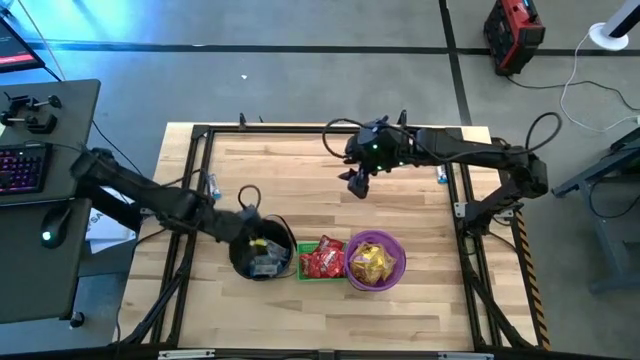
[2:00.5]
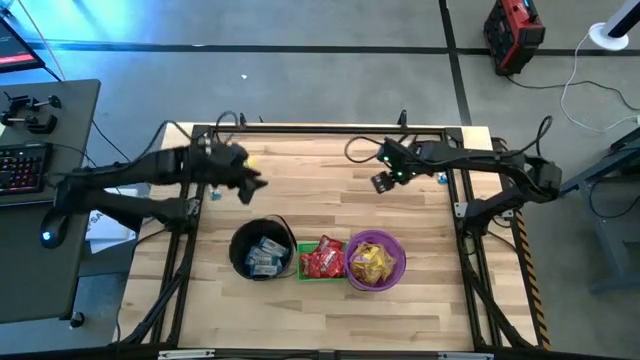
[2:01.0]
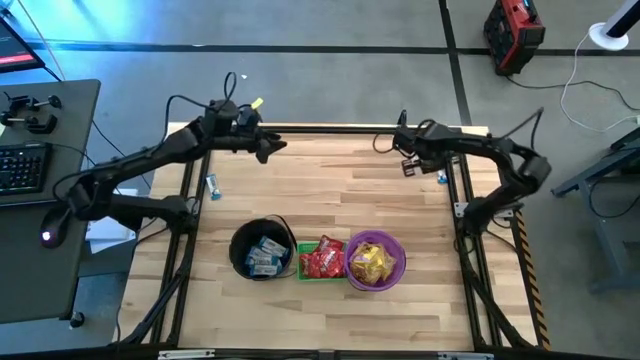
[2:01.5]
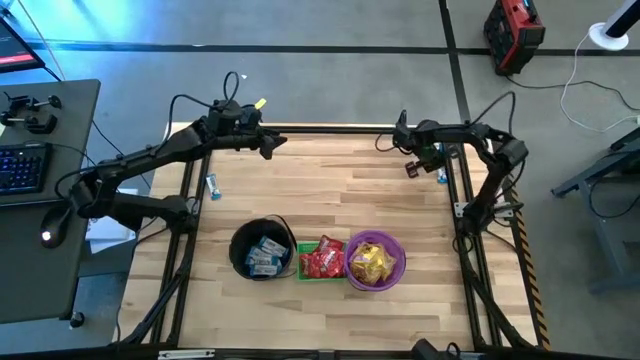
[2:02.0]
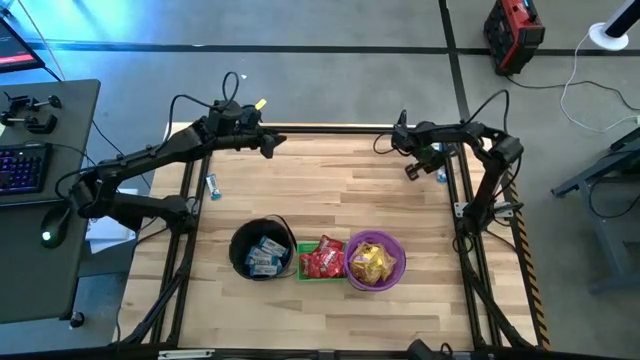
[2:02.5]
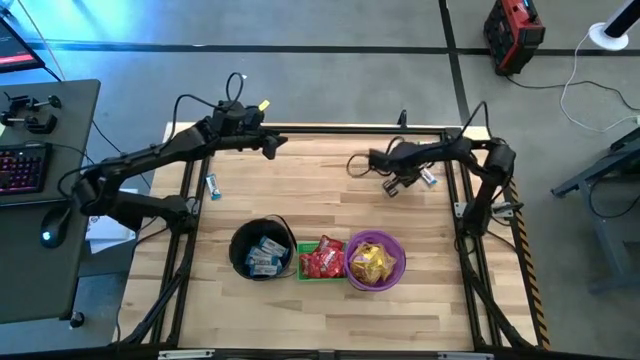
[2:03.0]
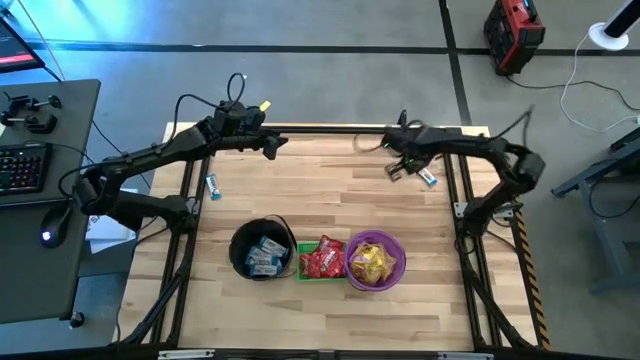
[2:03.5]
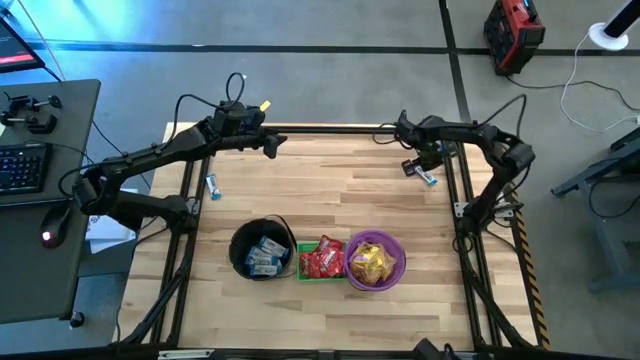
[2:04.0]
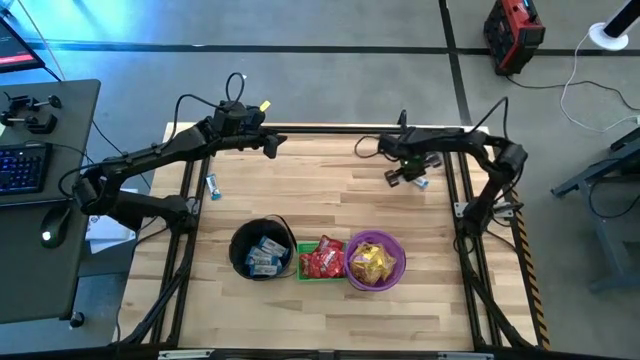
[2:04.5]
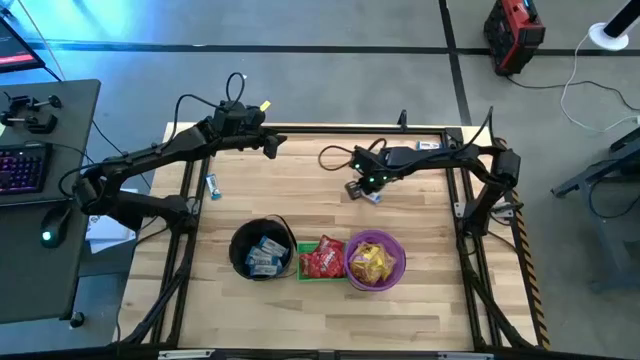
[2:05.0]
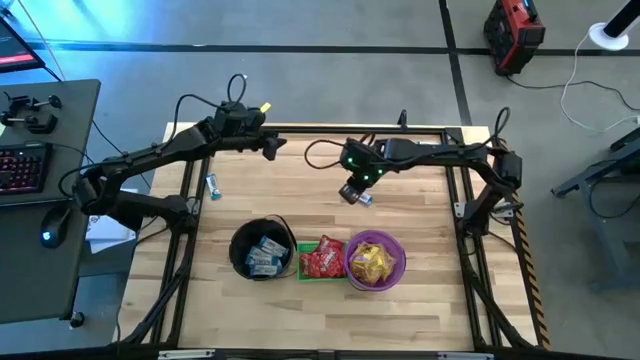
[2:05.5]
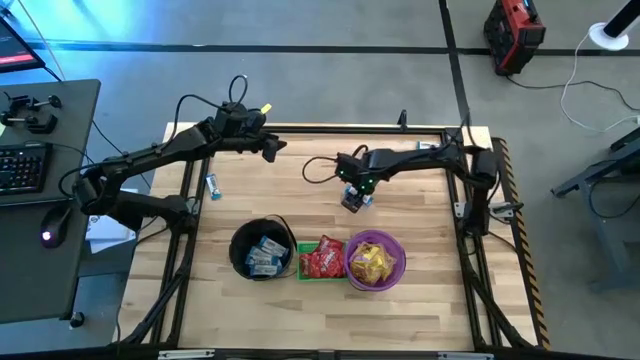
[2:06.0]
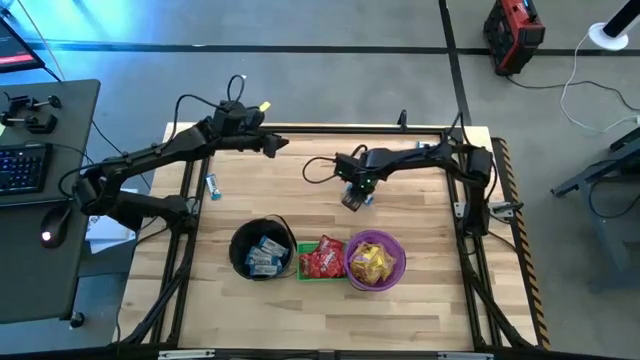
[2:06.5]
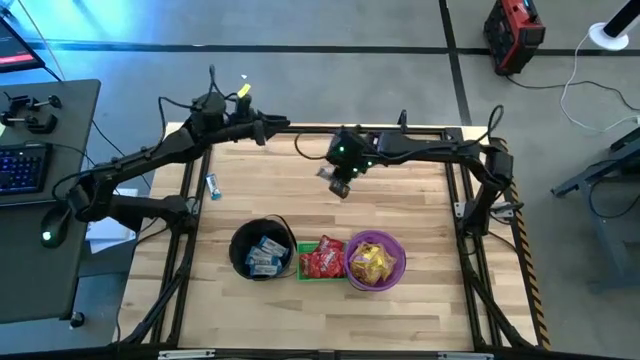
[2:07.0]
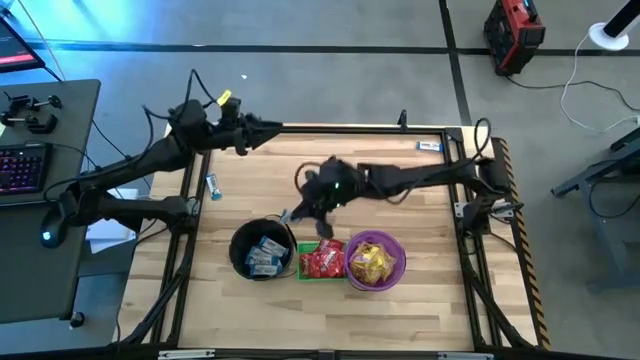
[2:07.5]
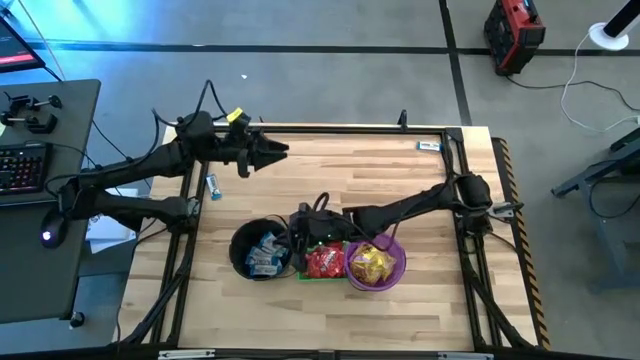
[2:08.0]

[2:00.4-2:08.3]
Task: Sort candy by brand, put in halloween buckets
Put the white chocolate into the black bucket

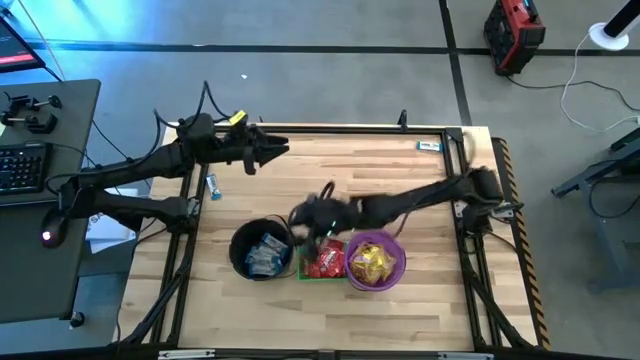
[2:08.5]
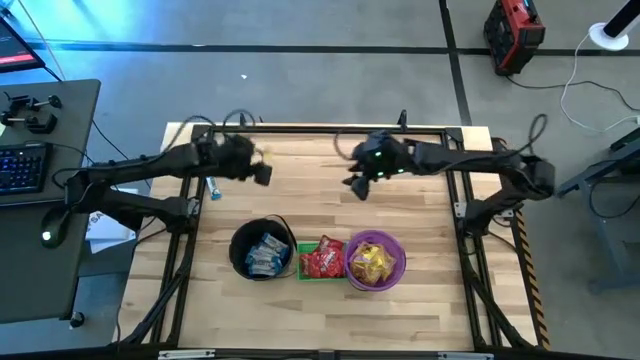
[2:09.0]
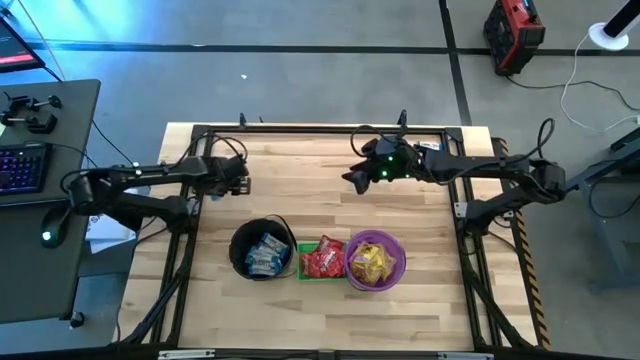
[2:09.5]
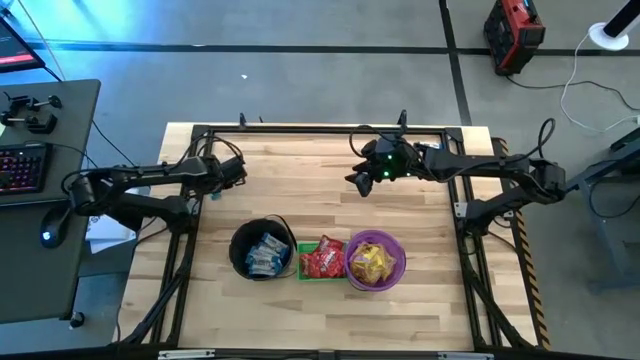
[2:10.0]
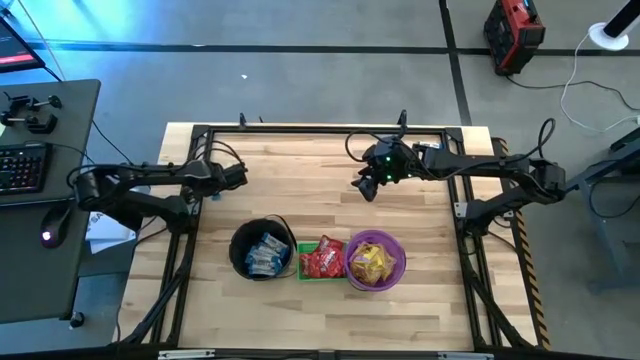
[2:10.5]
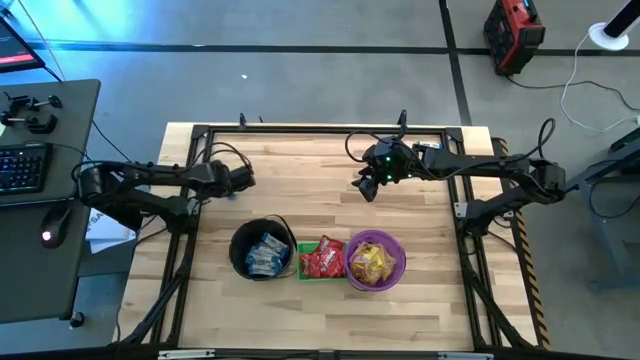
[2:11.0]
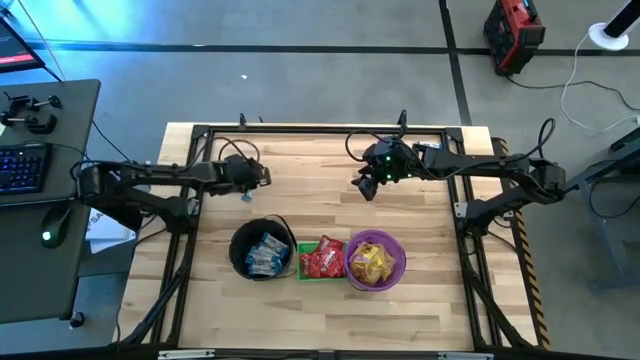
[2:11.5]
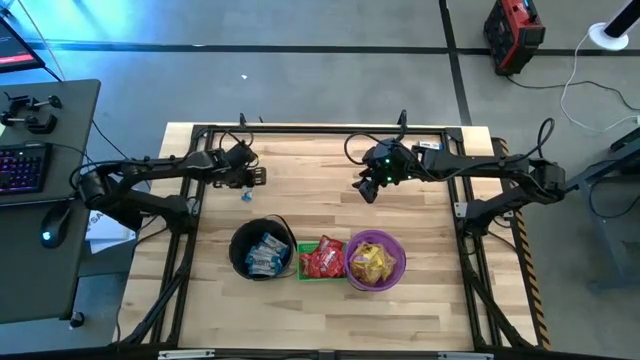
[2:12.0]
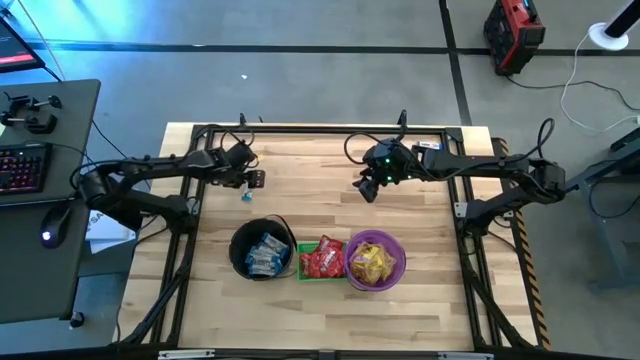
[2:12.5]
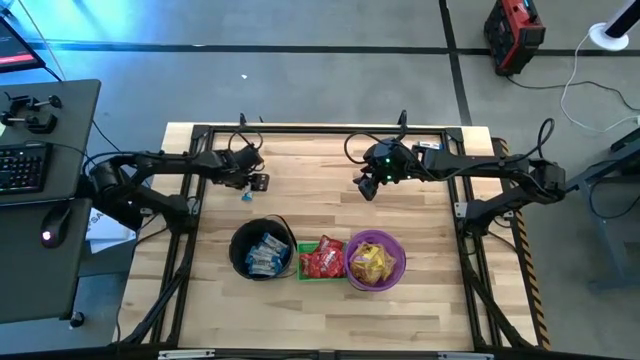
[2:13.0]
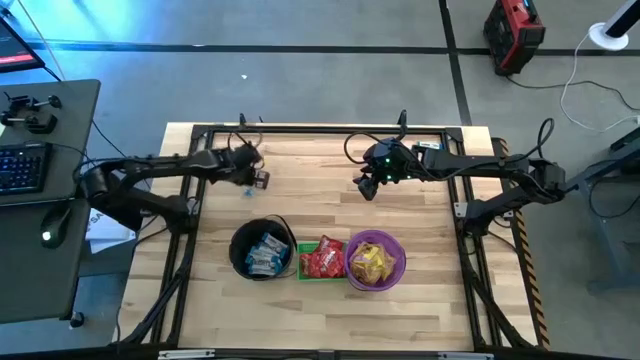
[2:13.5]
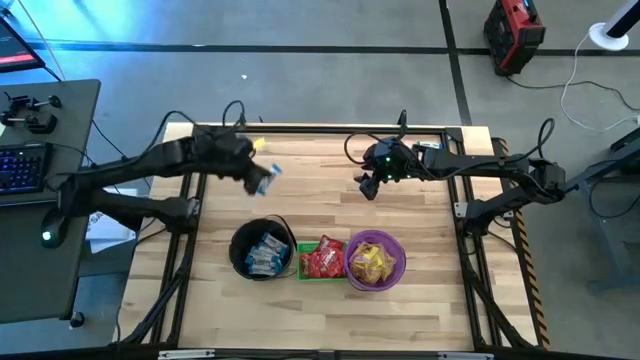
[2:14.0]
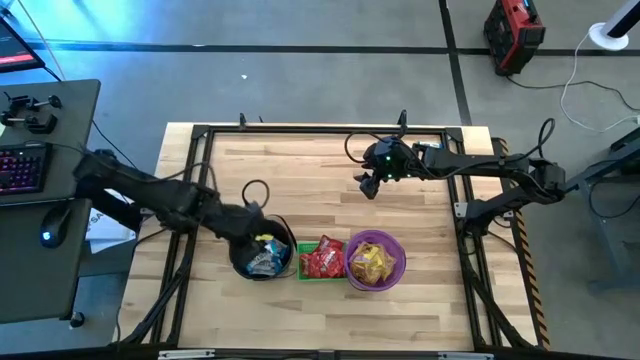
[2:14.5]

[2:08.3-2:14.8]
Put the white chocolate into the black bucket

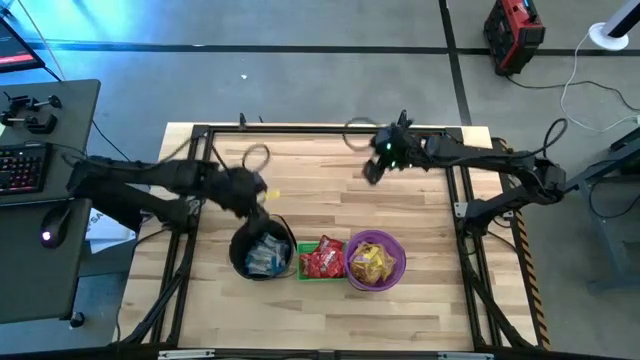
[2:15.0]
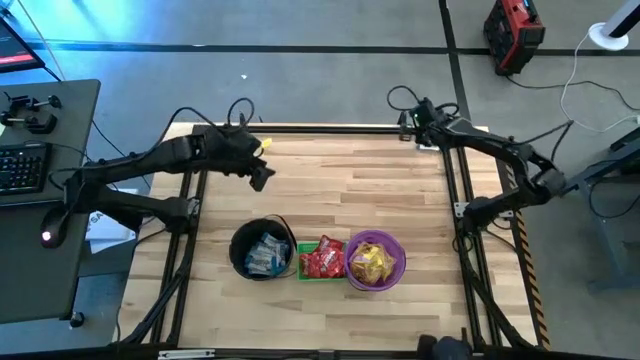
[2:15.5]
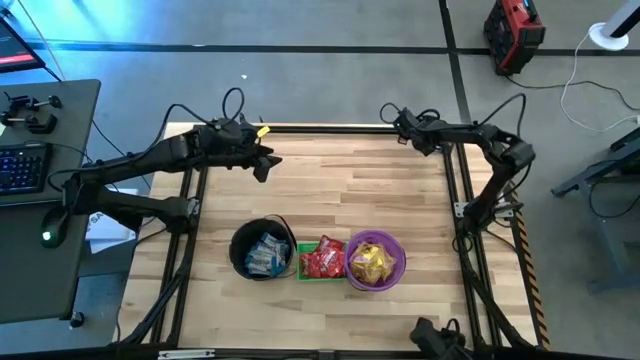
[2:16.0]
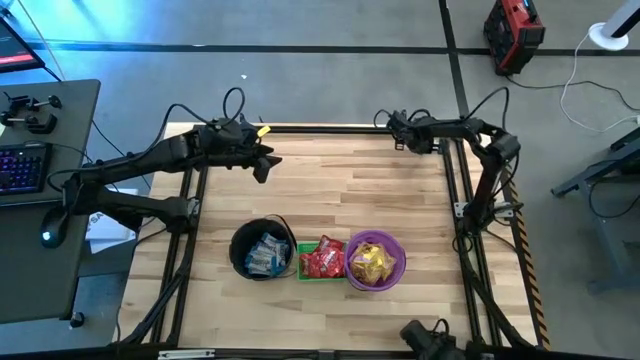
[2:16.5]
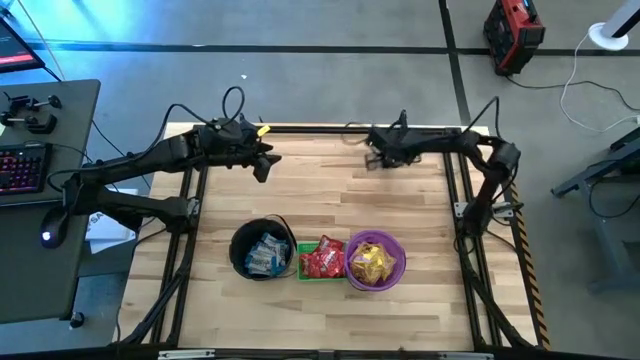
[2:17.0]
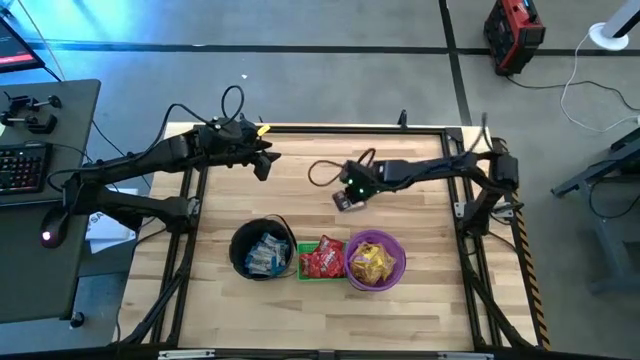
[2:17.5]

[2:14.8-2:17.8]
Put the white chocolate into the black bucket

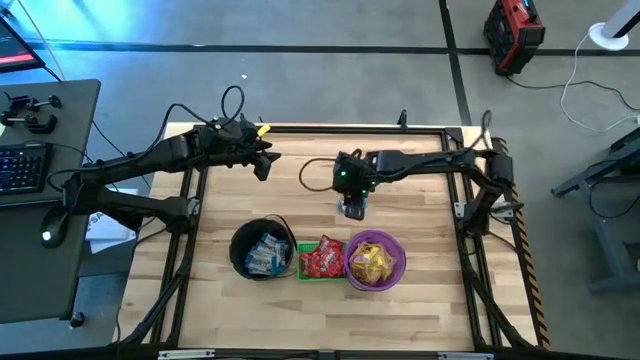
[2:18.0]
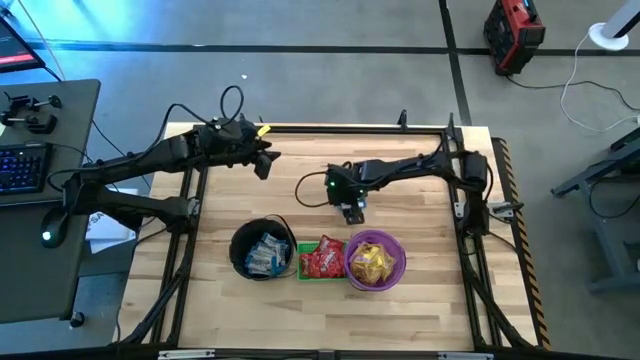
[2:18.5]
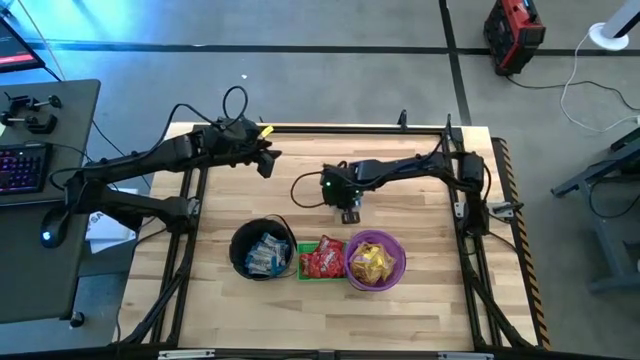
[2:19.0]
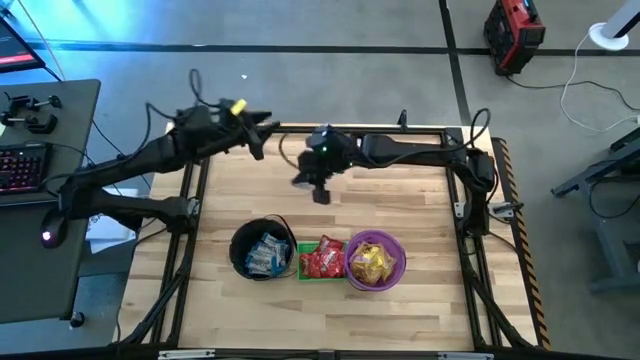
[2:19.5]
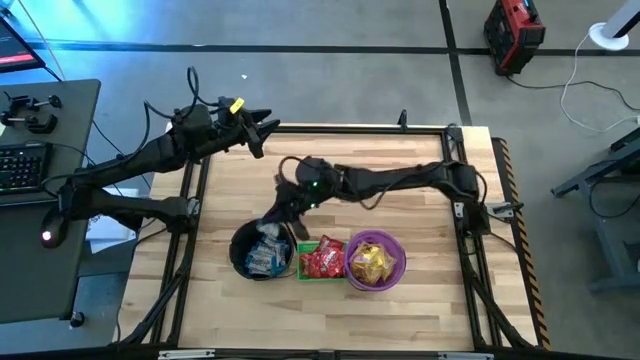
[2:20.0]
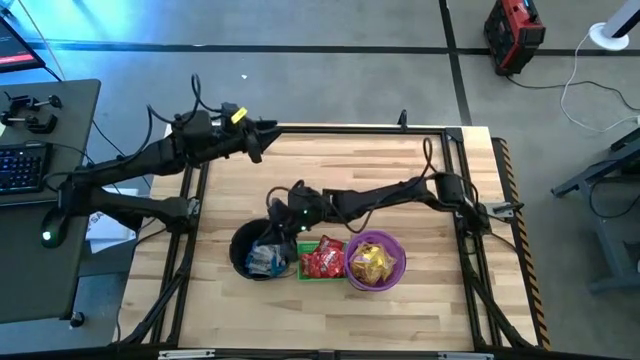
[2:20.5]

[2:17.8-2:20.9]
Put the white chocolate into the black bucket

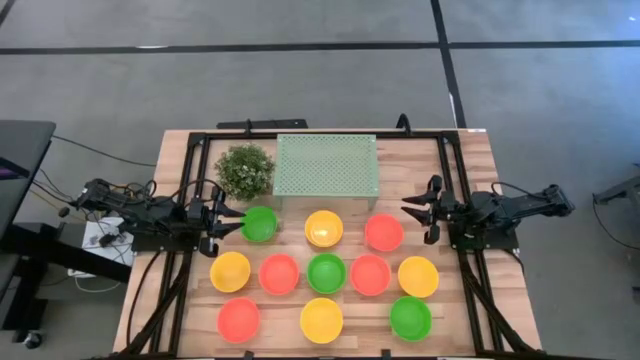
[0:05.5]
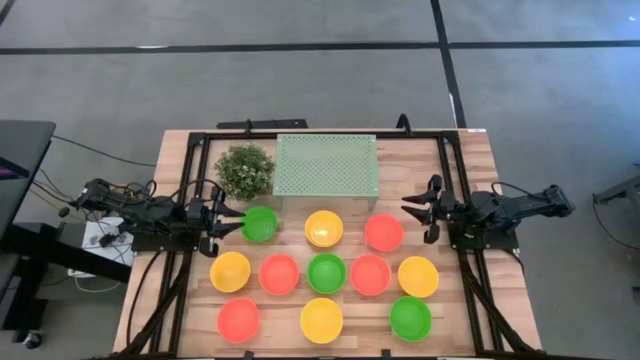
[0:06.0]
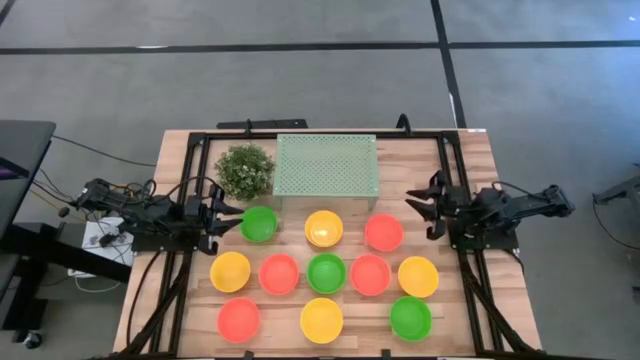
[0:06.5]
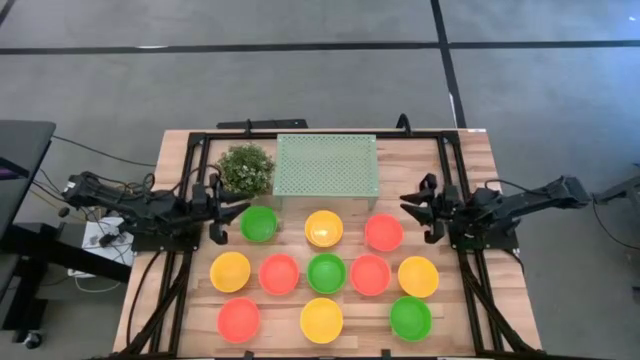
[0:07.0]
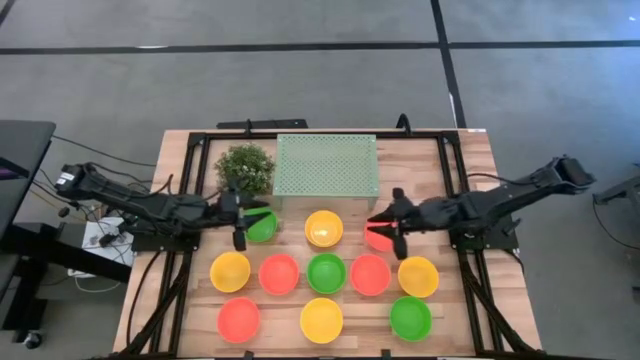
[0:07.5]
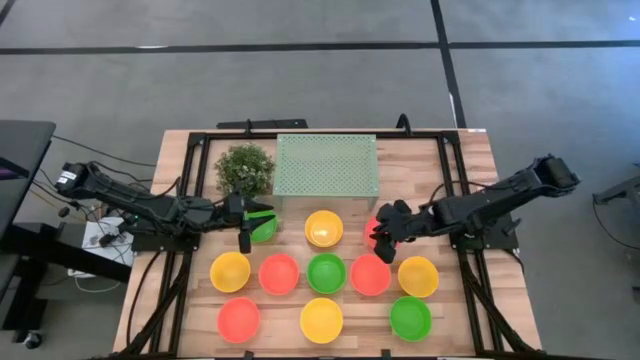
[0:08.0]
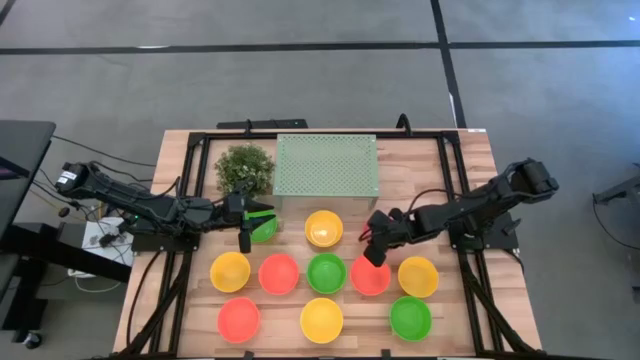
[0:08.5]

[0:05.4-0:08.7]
Task: Pick & Place Mini bowls
Put the orange bowl on the shelf
